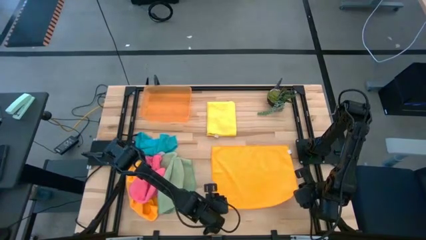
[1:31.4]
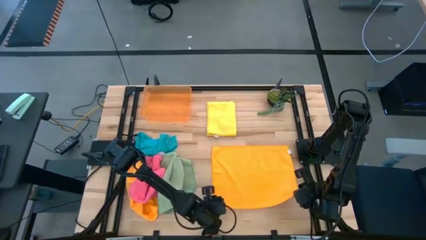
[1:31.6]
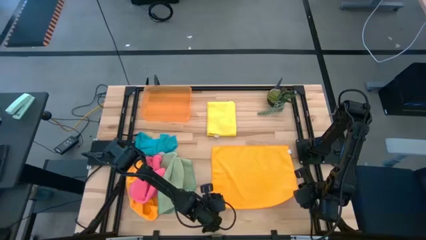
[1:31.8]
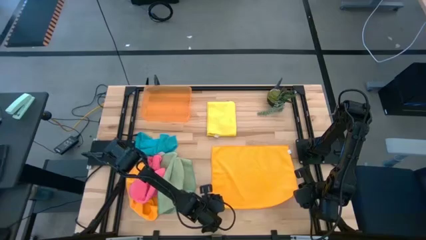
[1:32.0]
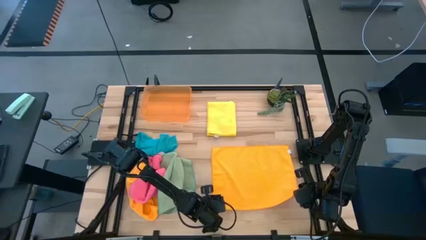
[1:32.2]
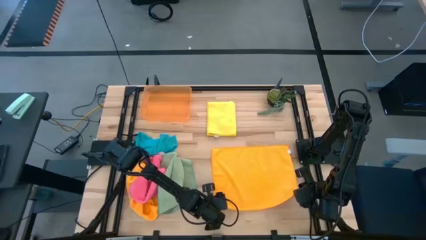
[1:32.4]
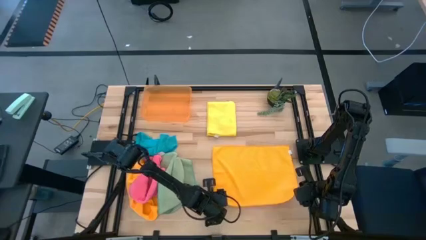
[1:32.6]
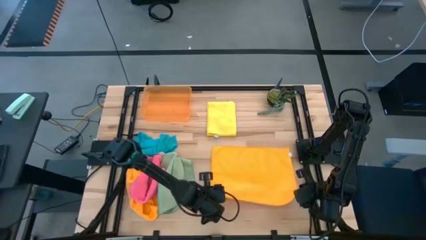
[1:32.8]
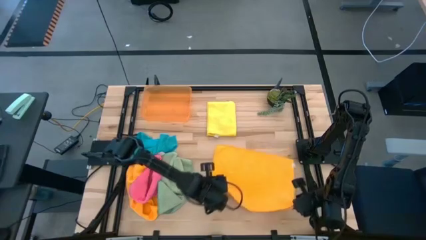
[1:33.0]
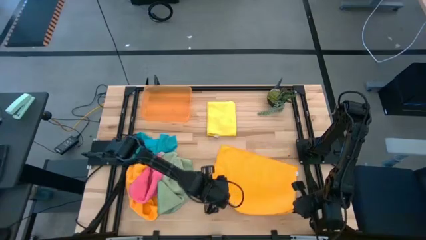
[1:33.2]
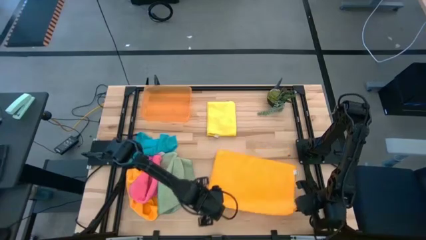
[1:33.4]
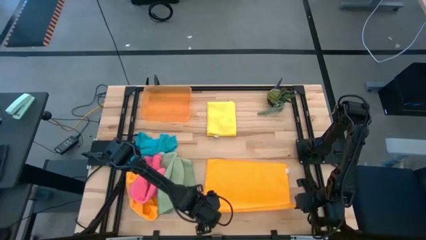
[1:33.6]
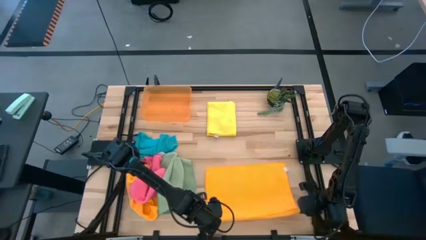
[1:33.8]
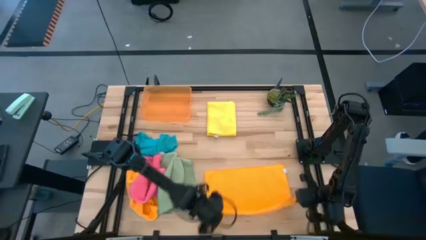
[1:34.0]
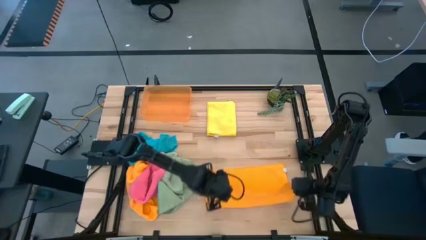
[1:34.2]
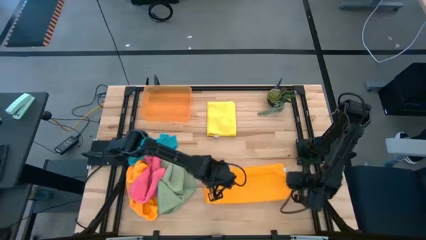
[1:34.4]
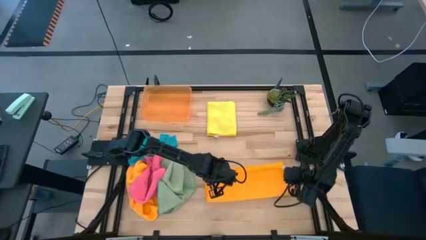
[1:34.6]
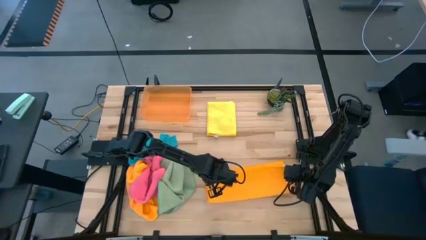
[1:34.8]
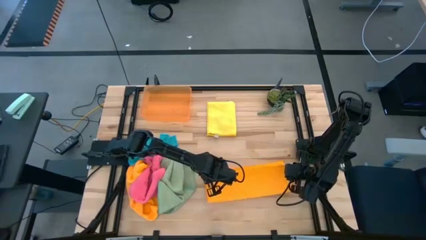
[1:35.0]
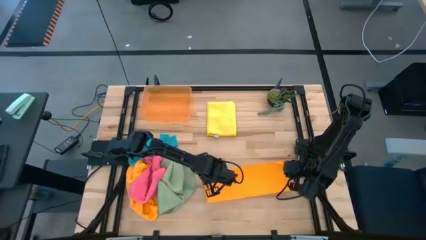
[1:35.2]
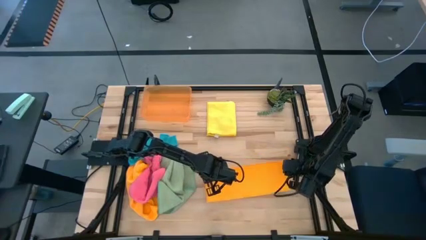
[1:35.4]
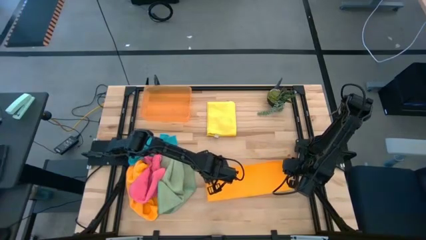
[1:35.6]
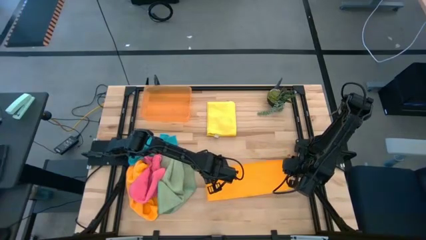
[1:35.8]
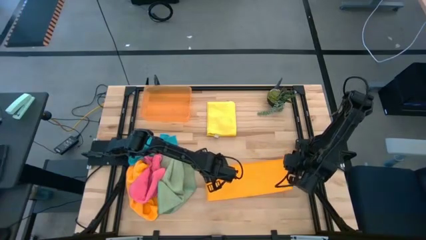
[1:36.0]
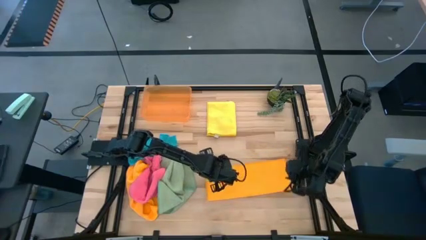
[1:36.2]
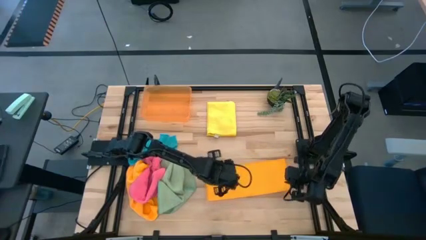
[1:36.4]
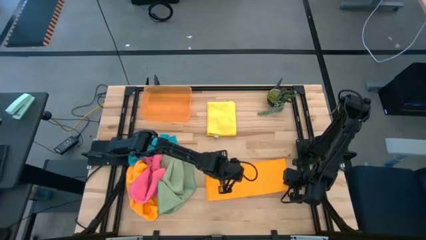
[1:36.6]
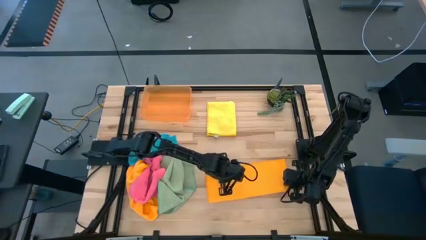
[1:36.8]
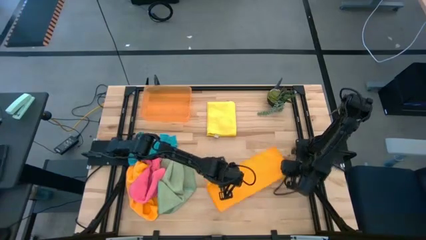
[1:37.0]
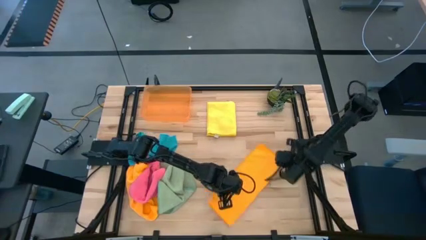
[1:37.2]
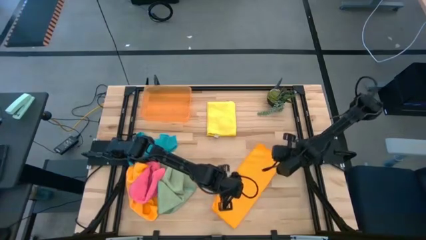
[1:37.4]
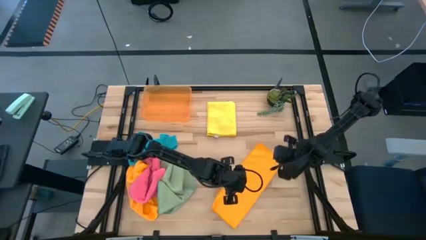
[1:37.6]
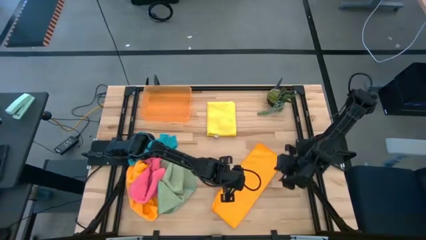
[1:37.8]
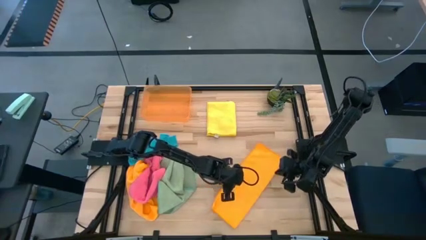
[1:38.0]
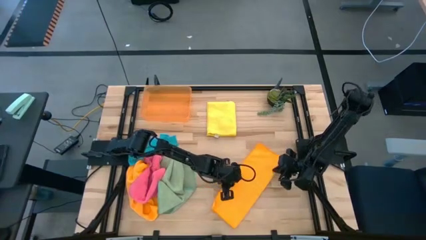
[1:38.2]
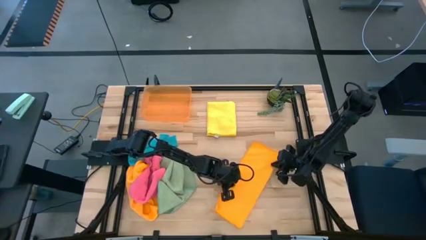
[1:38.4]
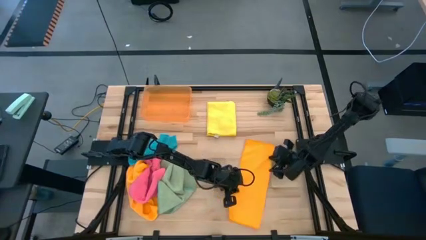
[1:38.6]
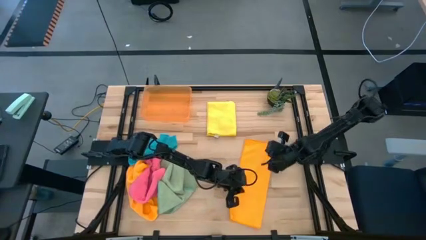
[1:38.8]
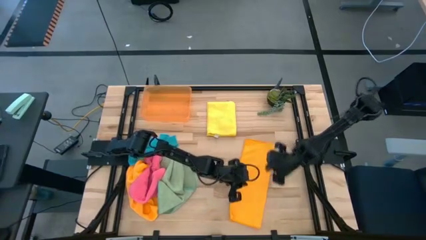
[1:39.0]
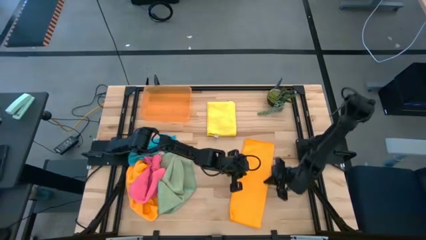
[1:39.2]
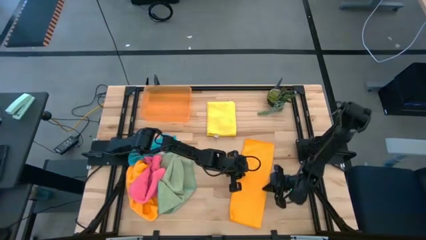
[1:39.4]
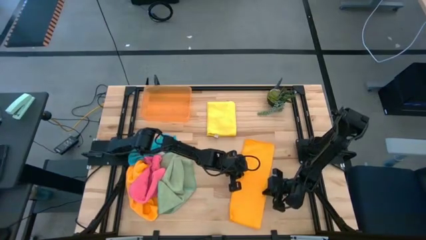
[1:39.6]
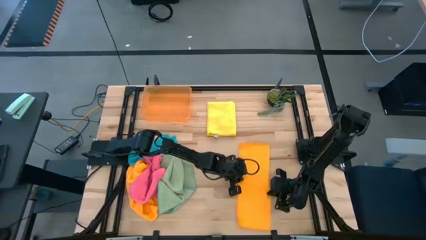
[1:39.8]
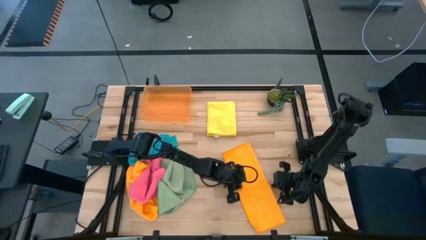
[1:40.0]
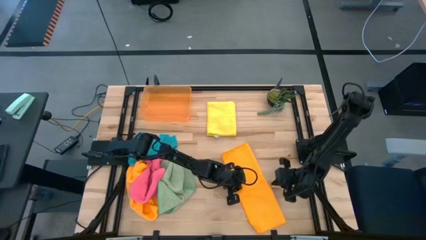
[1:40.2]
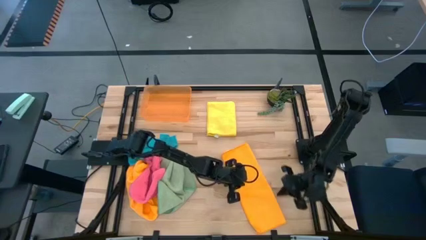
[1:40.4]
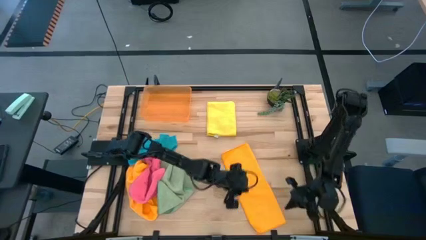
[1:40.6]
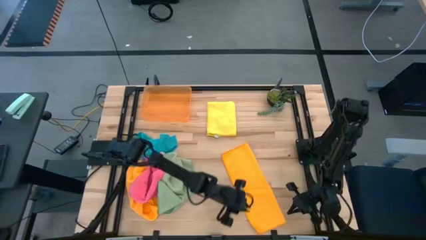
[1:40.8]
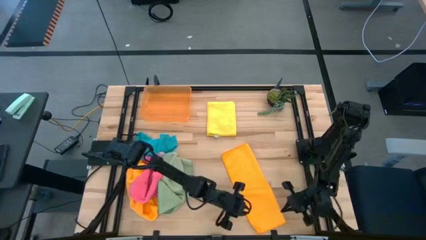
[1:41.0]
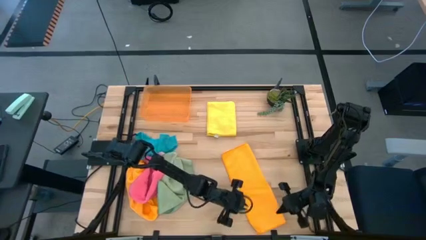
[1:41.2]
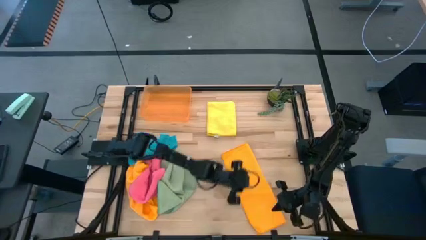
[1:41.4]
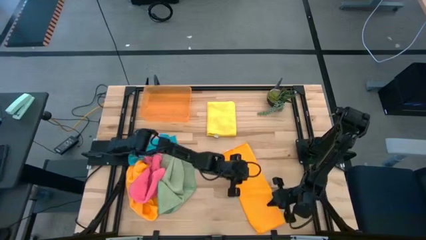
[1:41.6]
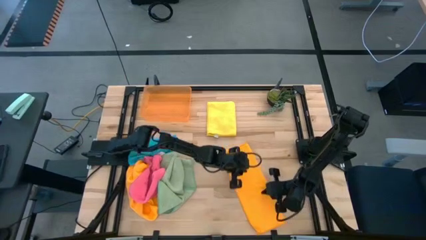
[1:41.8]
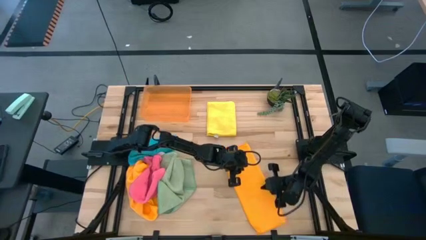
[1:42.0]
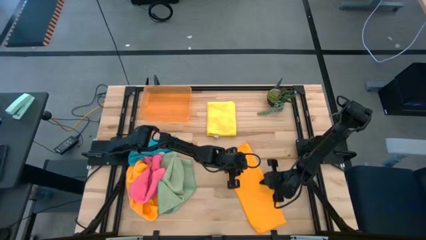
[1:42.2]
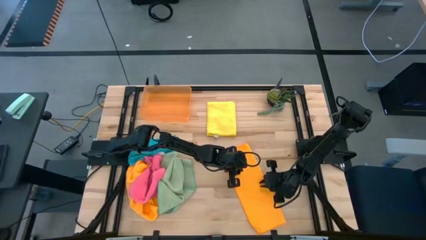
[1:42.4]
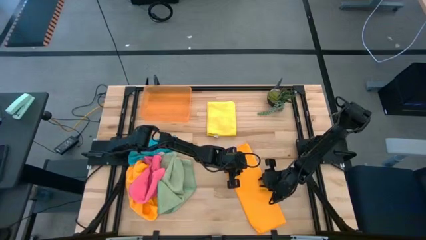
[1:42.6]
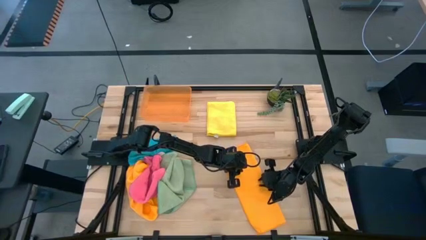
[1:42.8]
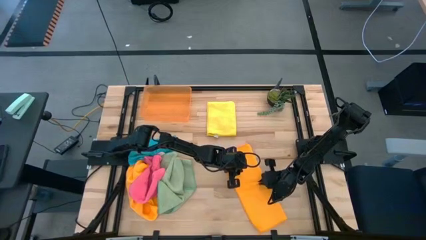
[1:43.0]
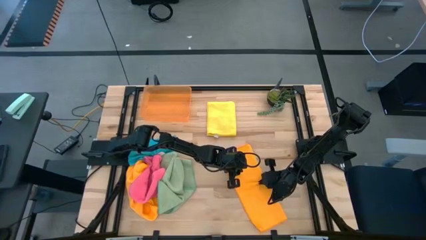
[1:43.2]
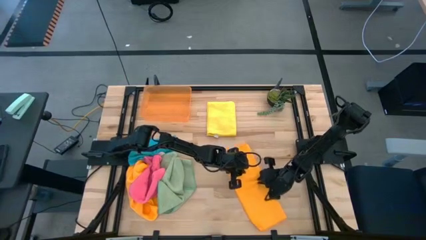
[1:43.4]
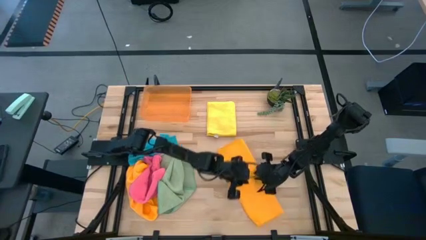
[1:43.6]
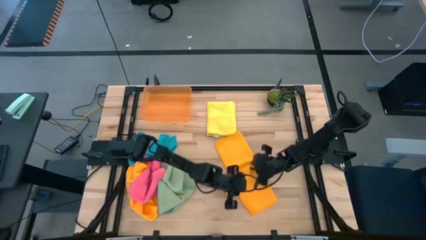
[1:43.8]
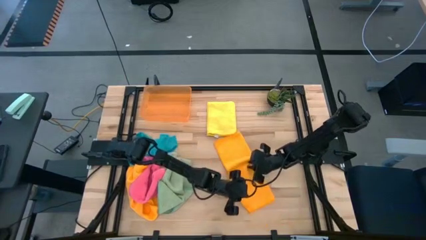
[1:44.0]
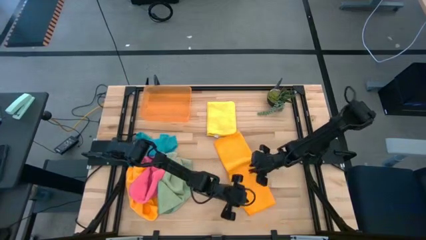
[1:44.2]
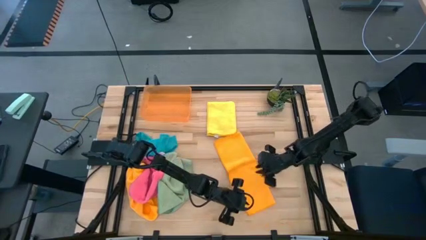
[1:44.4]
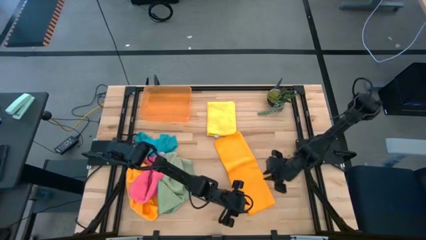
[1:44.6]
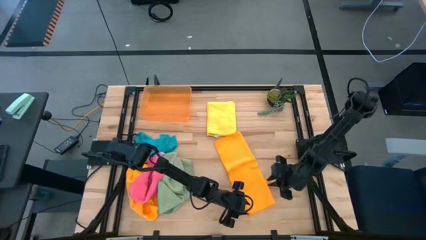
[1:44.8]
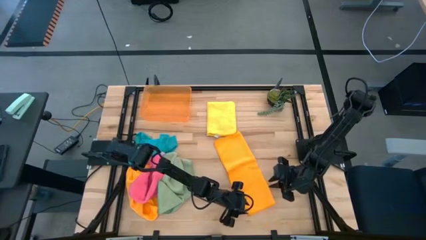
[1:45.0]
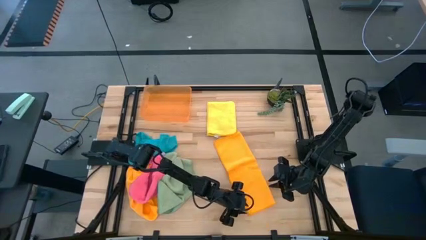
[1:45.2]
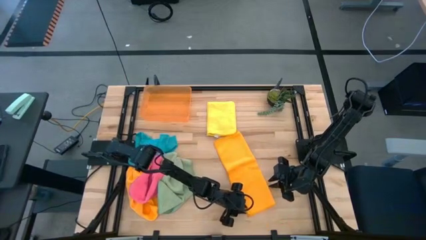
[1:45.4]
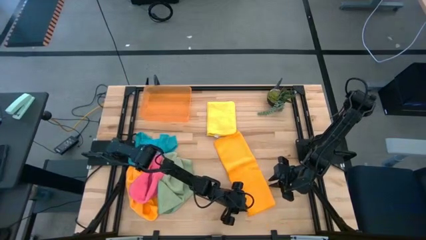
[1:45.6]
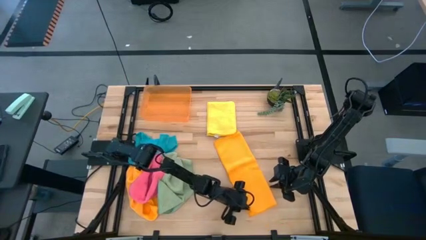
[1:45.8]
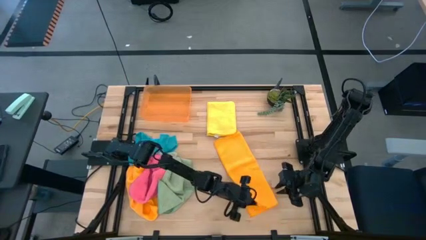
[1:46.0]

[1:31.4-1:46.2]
Task: Fold microfiber towels
Fold the right orange towel

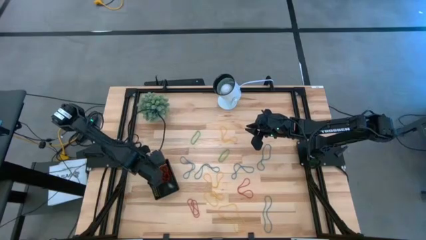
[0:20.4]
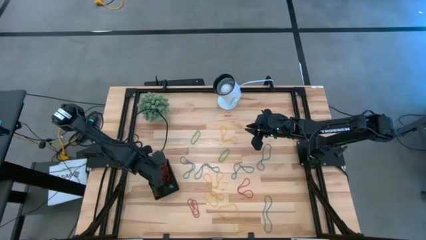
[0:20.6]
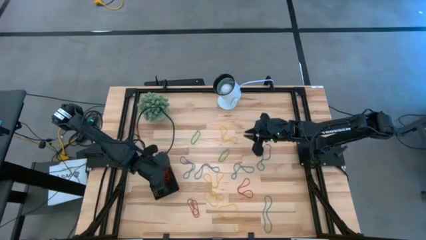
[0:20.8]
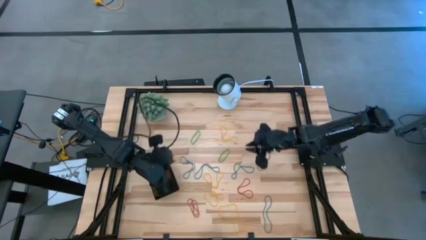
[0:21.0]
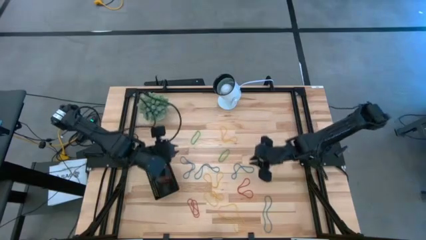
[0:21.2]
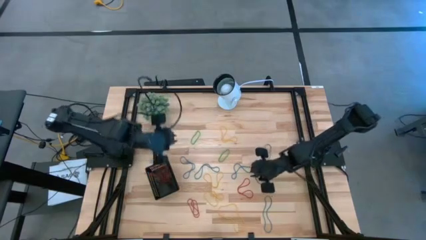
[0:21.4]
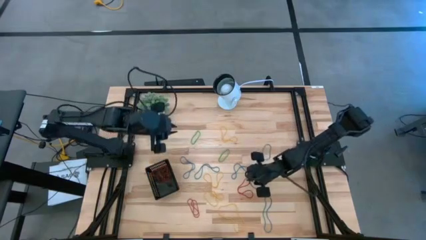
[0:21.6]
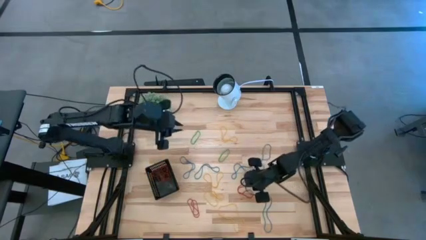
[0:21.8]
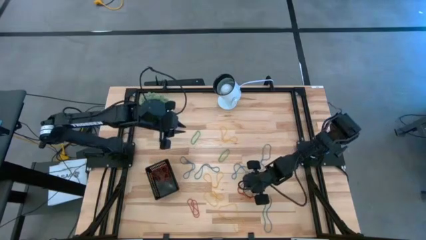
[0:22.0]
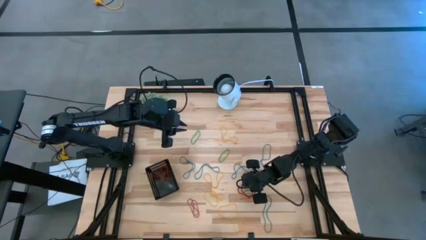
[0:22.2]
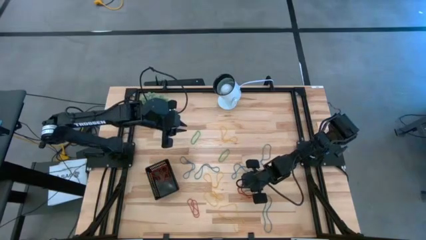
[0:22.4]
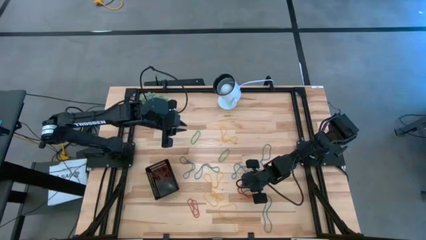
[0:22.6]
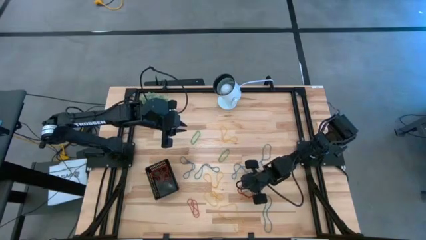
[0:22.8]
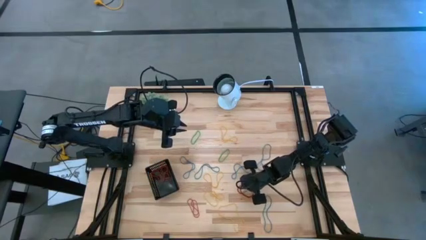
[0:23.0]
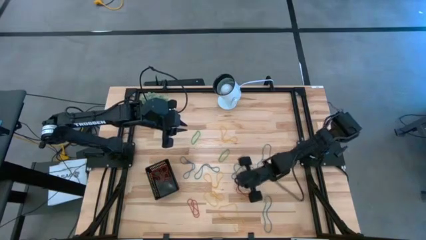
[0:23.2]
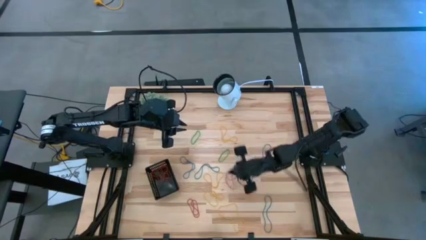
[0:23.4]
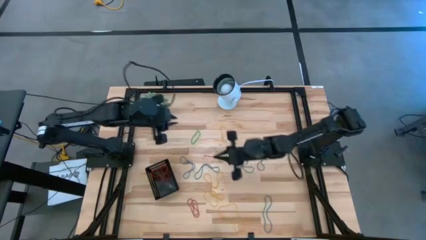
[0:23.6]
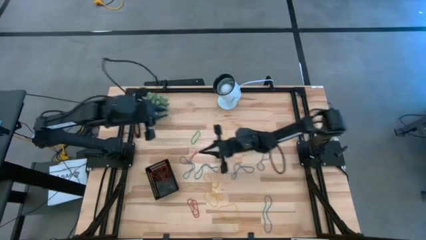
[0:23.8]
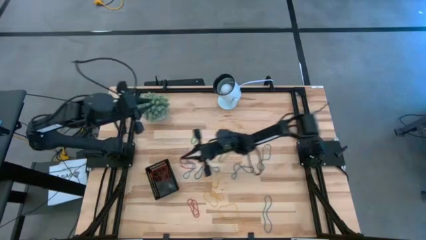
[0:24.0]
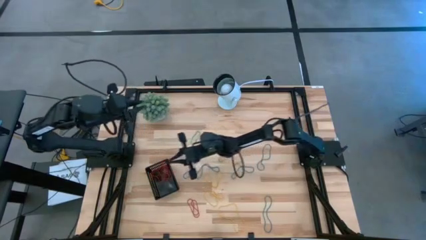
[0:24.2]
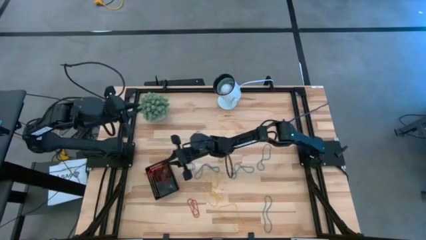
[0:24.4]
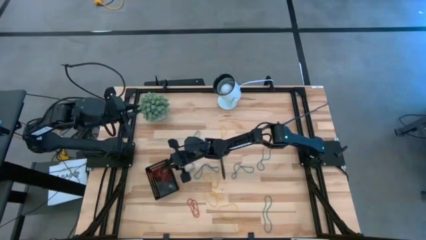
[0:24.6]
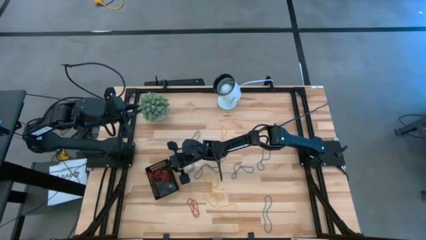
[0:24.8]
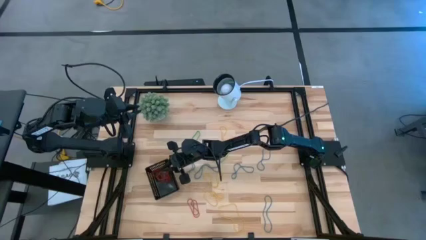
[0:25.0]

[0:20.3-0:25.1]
Task: Pick and place items into bin
Put the red rubber band into the black bin
